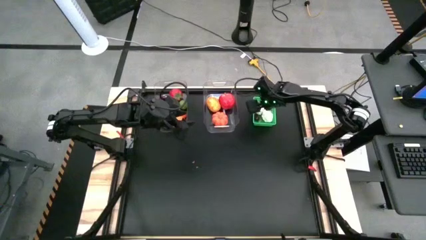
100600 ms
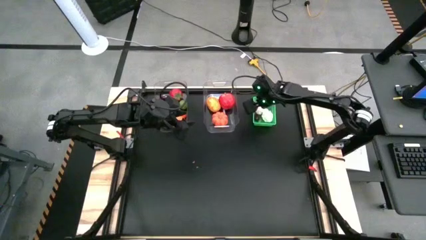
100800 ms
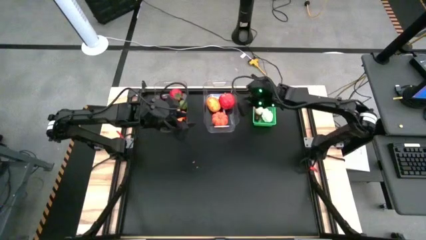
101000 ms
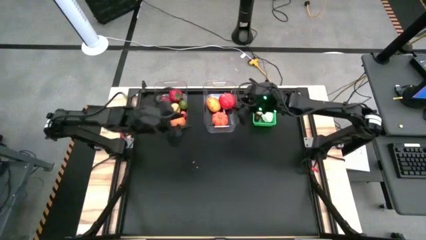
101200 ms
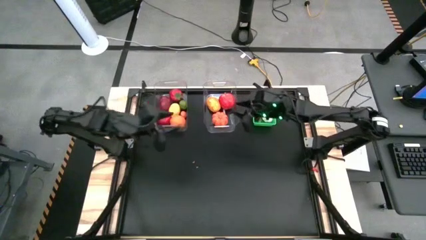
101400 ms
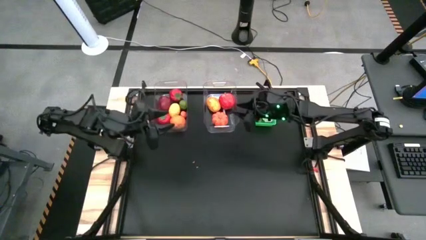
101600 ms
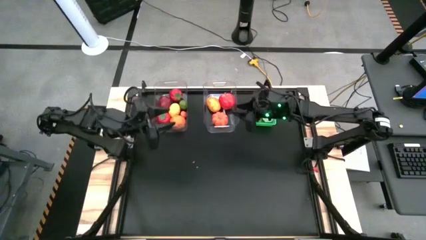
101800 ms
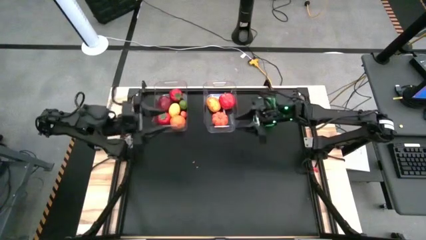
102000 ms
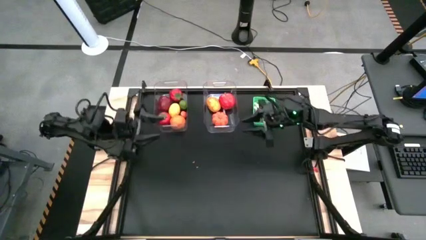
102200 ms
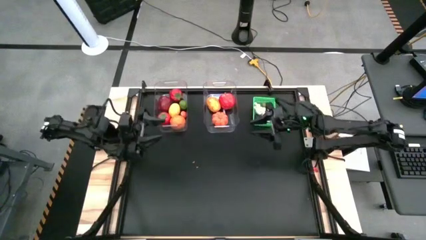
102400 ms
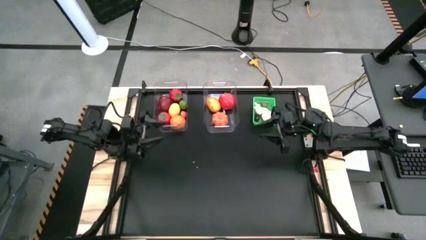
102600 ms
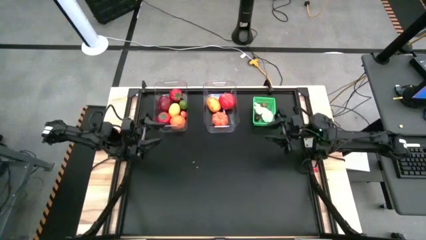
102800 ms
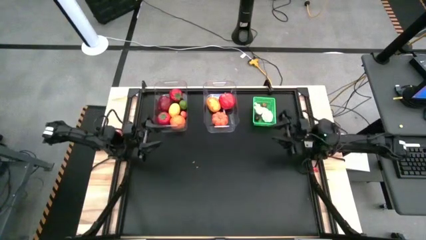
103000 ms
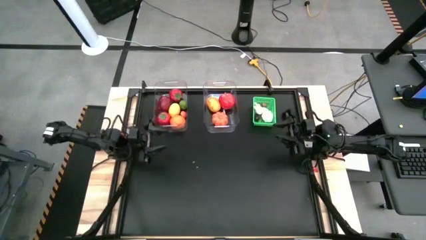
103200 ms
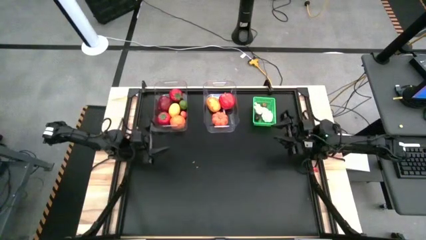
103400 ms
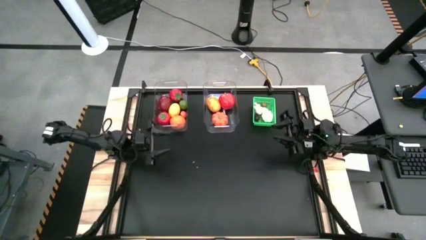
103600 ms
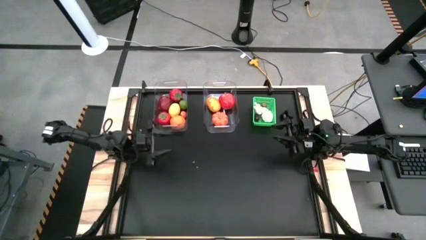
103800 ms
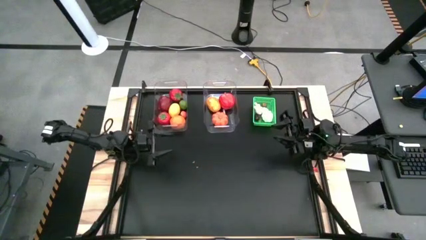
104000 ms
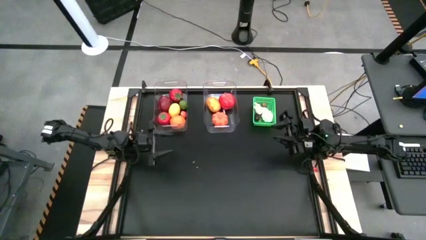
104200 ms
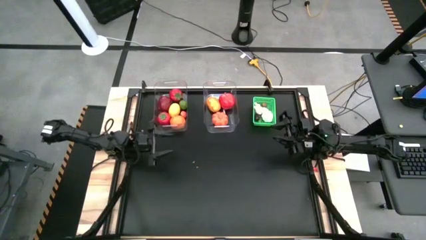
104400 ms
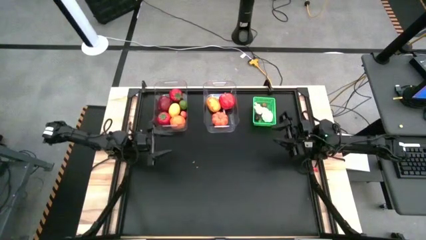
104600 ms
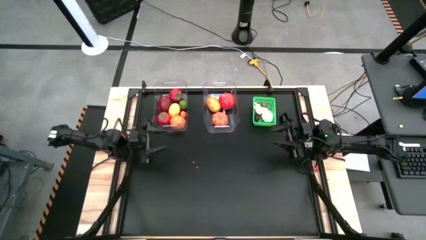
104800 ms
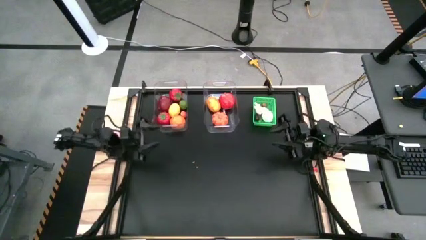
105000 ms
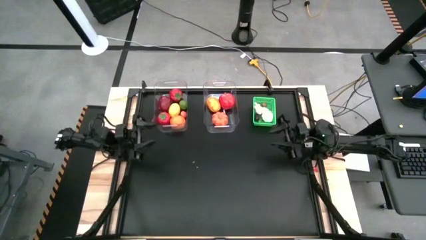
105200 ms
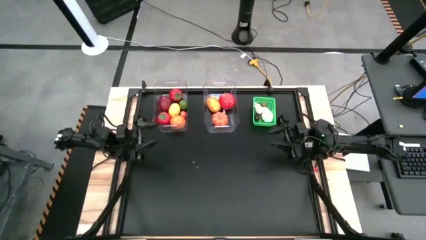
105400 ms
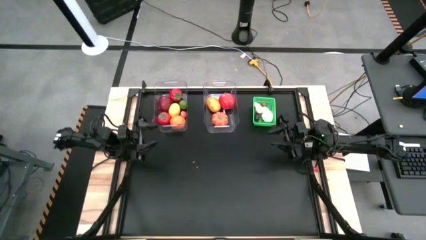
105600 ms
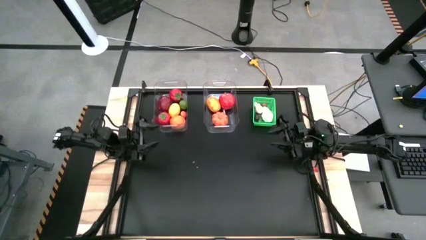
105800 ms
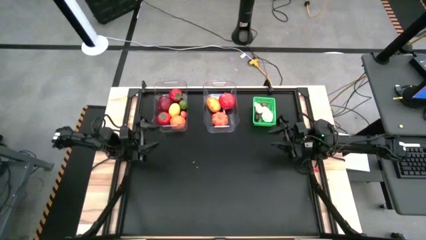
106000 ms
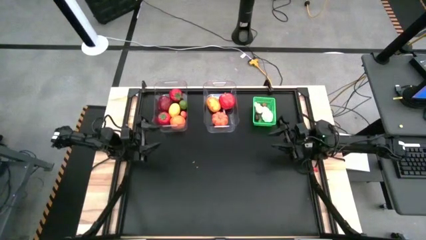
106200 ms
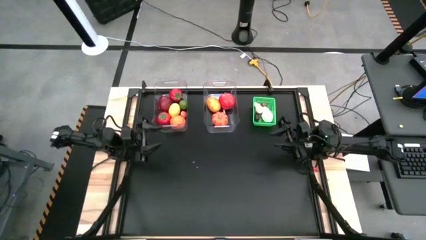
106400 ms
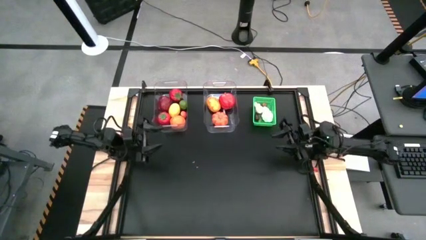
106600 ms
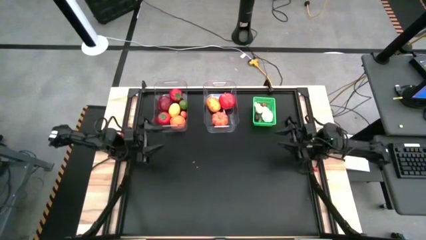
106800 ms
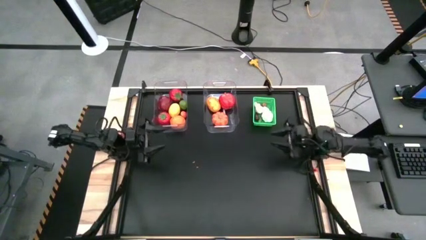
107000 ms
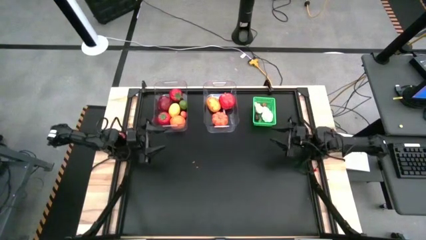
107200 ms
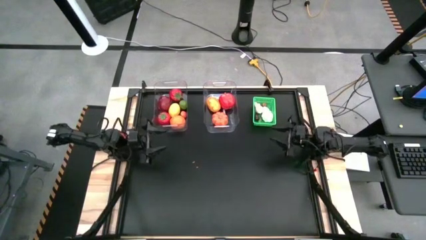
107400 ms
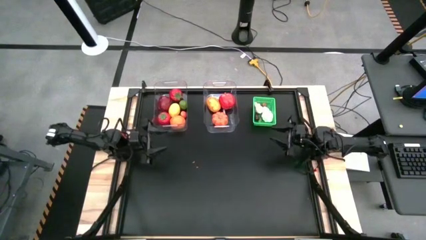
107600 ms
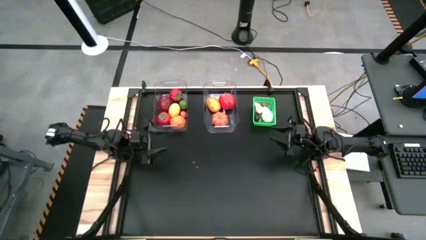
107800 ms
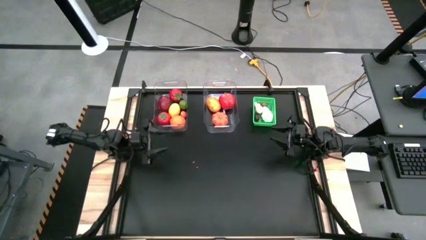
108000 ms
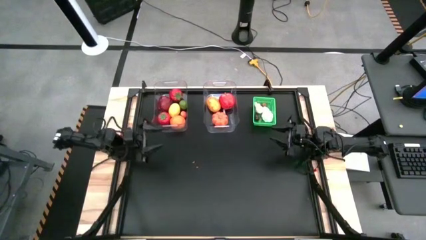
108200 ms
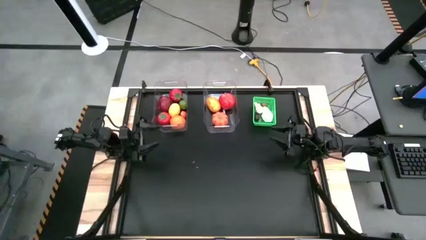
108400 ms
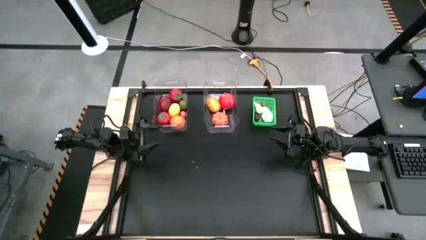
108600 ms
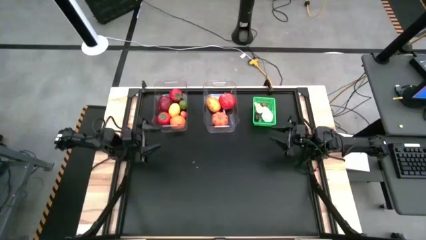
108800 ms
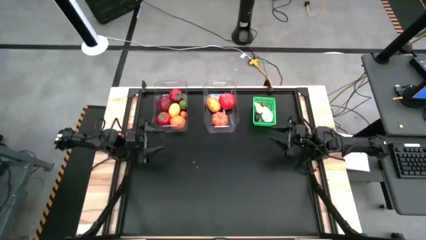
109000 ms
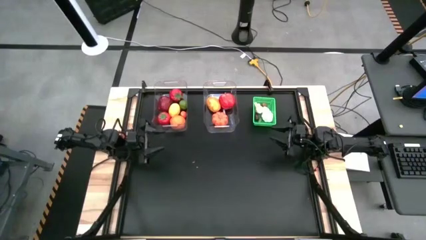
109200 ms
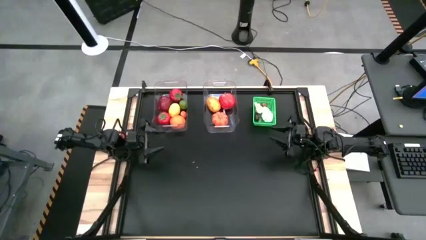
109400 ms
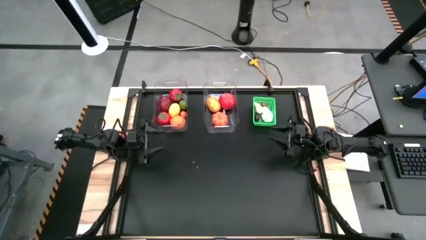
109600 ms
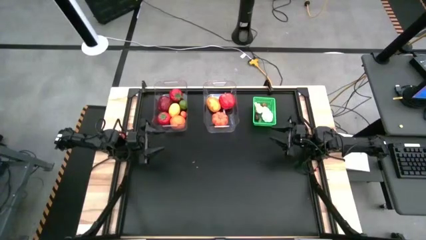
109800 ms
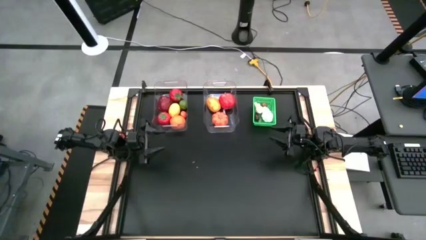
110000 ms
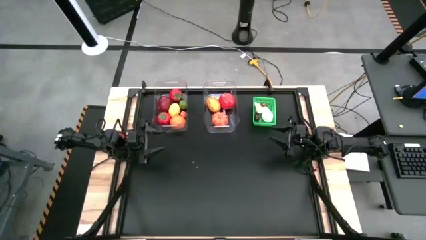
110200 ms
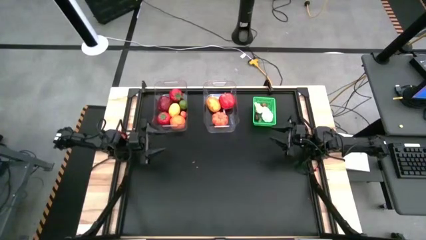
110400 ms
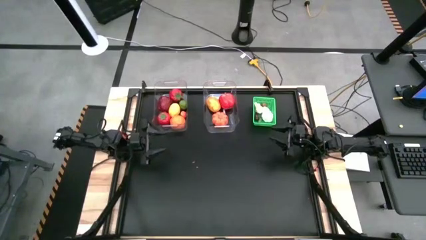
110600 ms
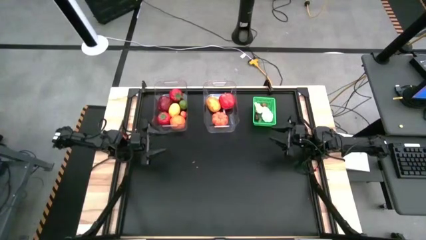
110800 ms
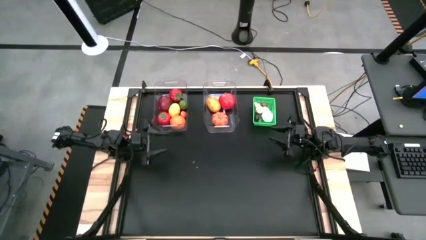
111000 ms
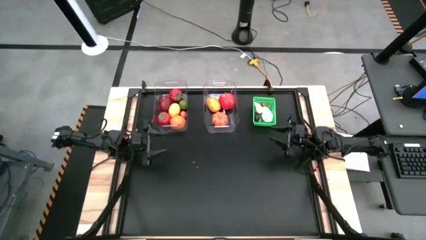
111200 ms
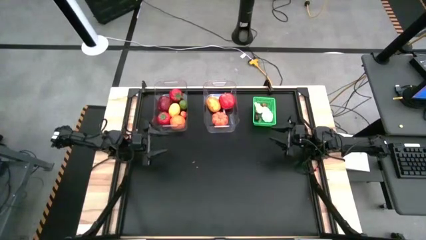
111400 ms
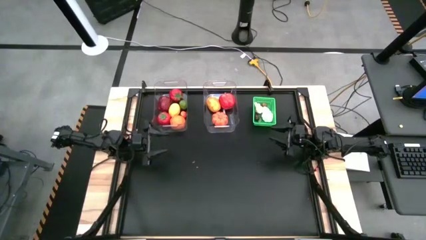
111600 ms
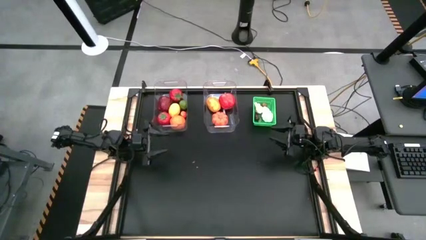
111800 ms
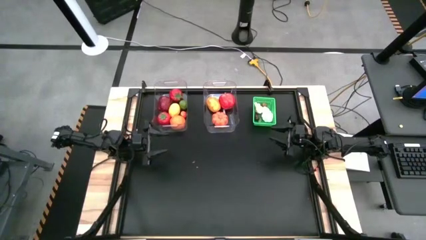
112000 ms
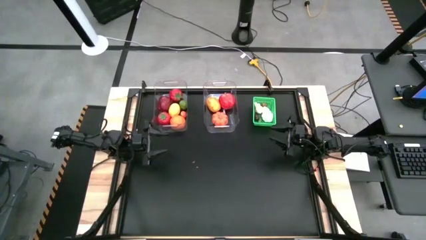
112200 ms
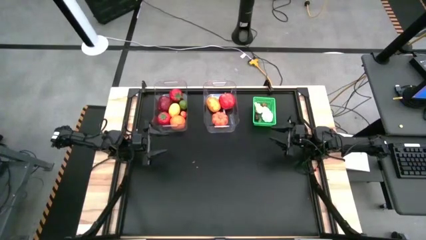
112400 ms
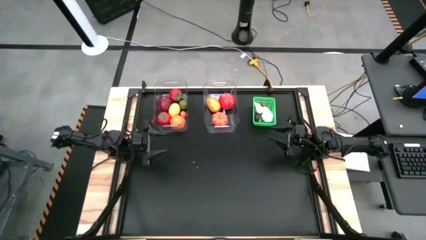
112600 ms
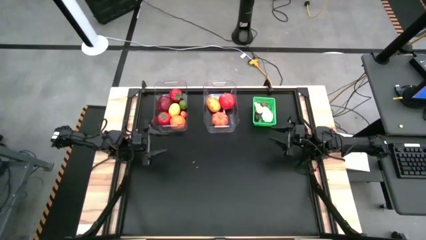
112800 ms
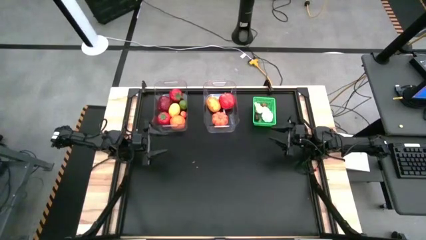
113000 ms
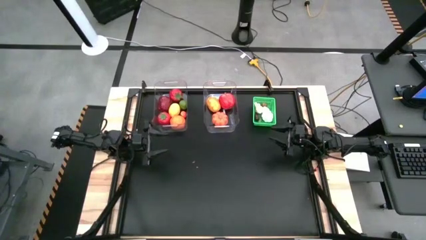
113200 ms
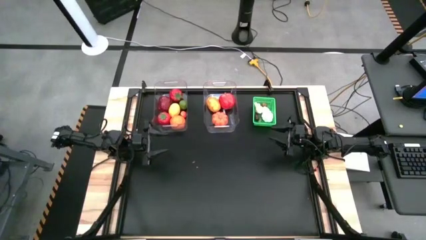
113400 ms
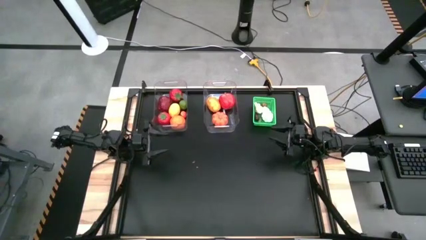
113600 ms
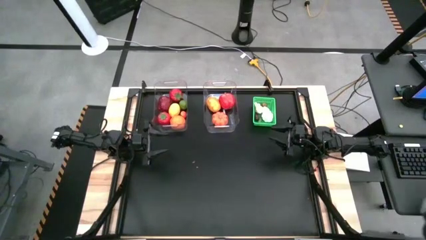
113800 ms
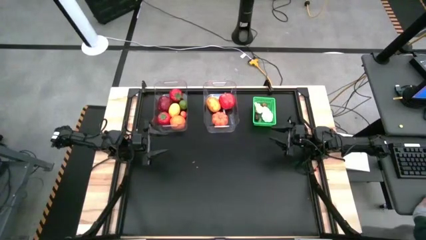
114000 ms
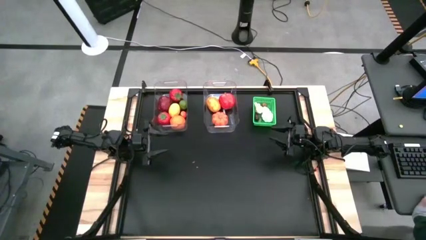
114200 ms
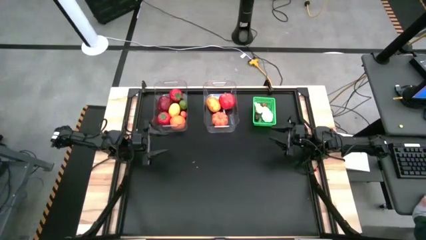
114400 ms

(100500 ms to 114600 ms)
Task: Sort produce into baskets
Return to Home Position

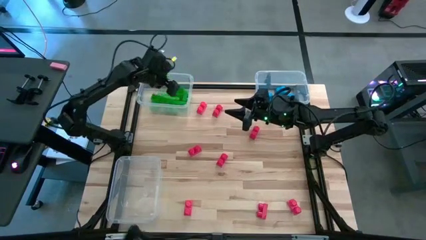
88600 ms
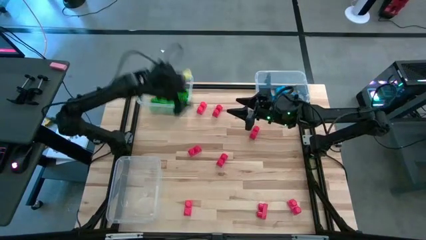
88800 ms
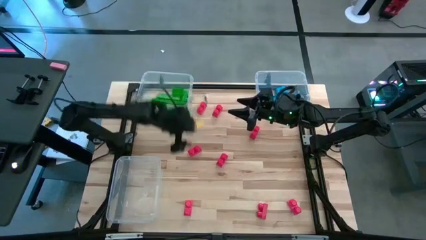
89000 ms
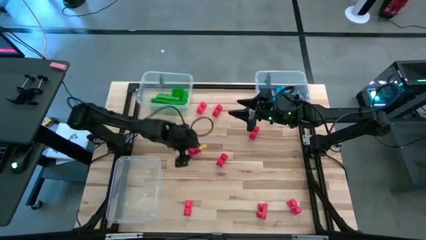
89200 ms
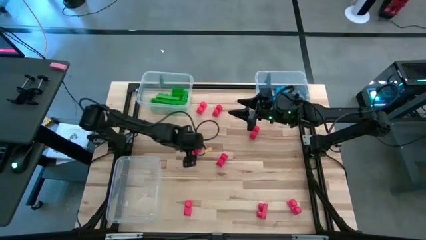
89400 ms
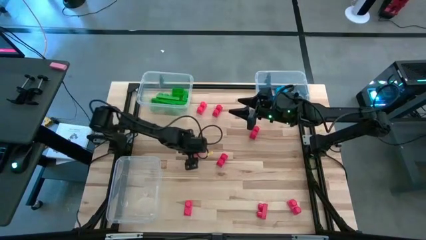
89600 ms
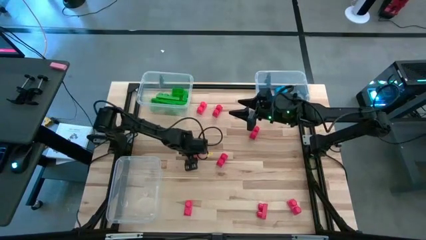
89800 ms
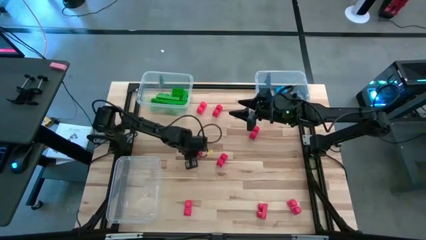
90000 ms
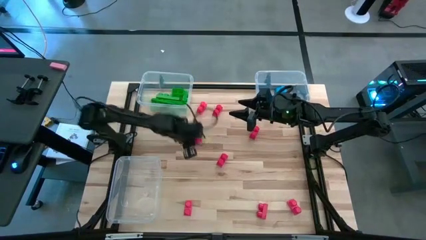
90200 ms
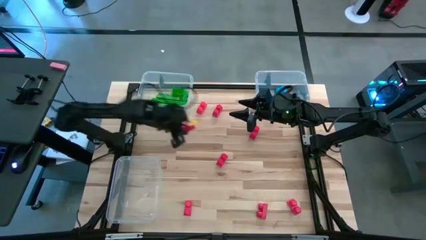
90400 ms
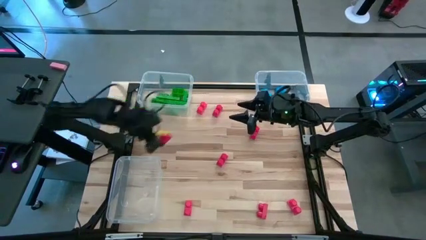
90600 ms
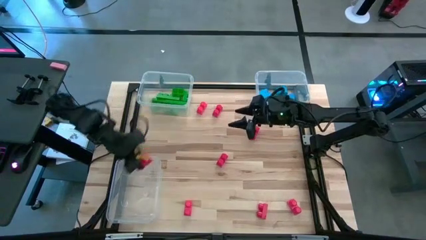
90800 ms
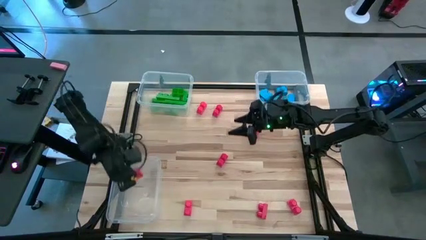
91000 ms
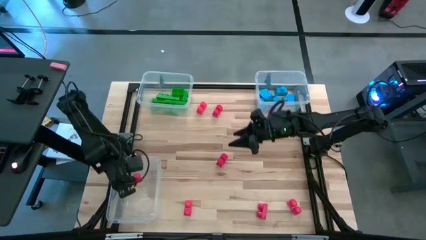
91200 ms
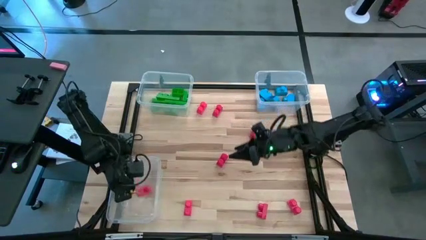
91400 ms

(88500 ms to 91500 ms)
Task: Sort blocks
Put the red game piece into the bottom left transparent bin
